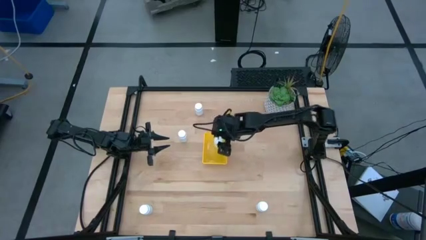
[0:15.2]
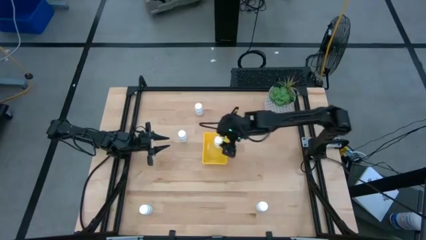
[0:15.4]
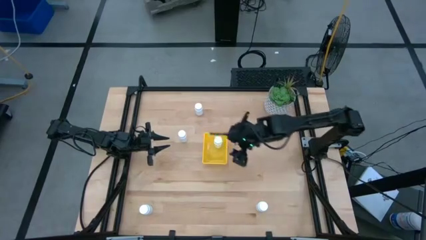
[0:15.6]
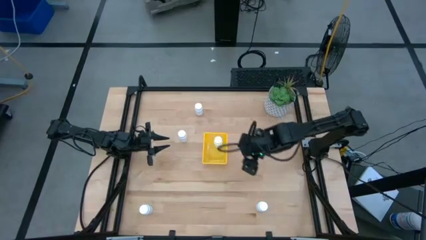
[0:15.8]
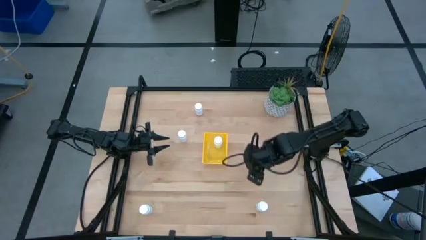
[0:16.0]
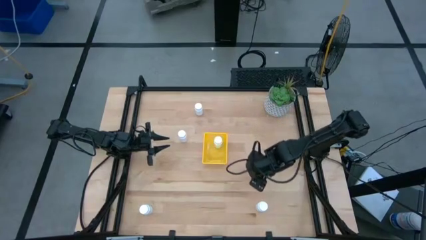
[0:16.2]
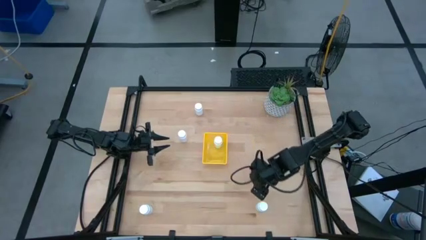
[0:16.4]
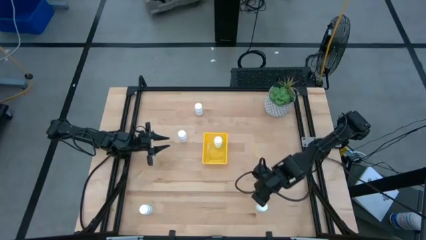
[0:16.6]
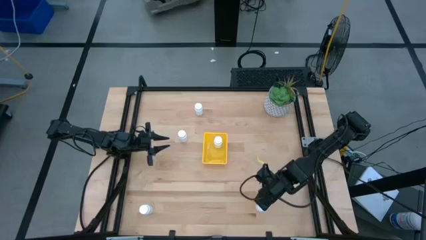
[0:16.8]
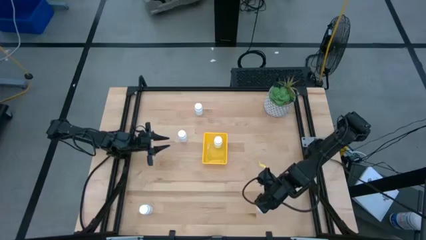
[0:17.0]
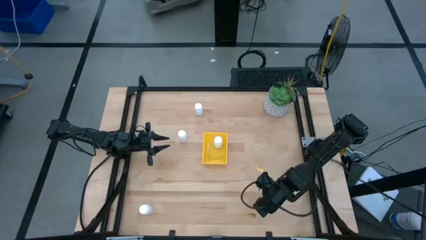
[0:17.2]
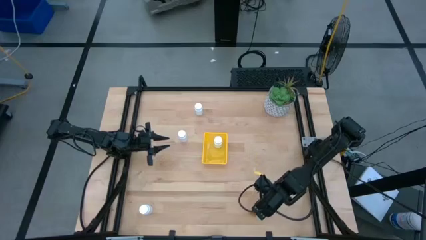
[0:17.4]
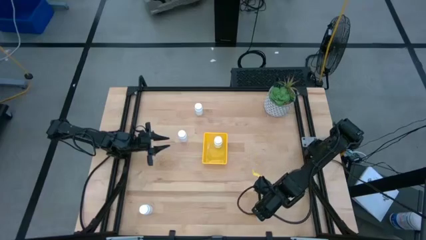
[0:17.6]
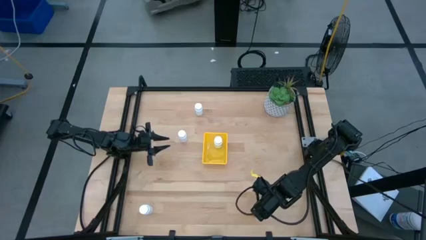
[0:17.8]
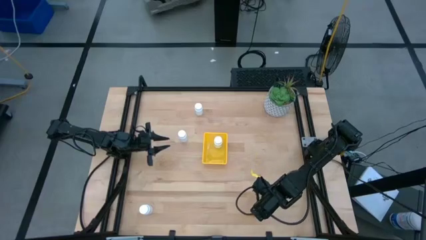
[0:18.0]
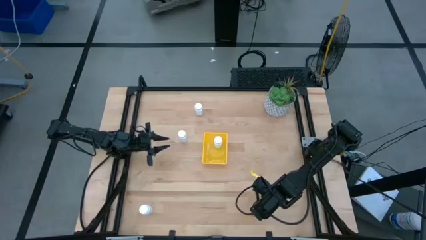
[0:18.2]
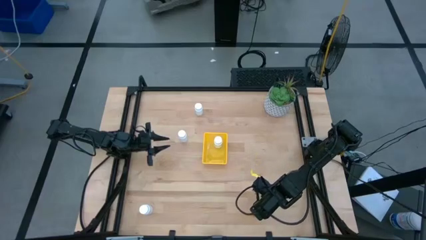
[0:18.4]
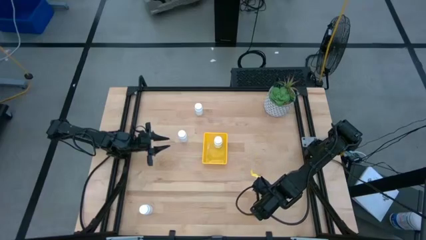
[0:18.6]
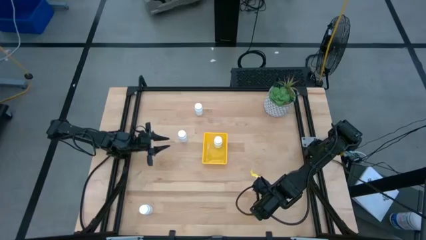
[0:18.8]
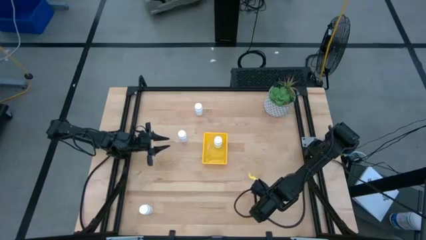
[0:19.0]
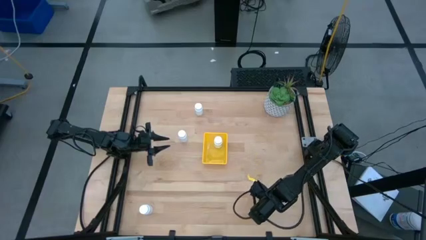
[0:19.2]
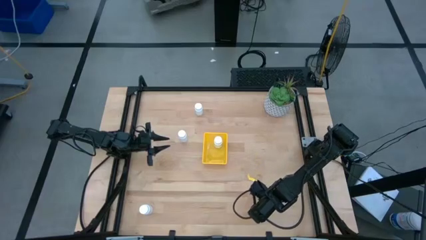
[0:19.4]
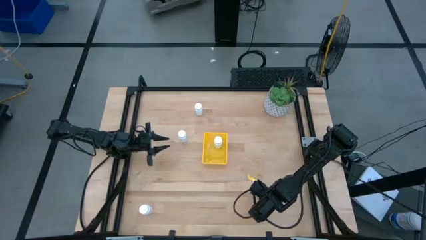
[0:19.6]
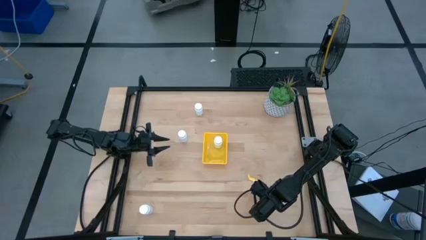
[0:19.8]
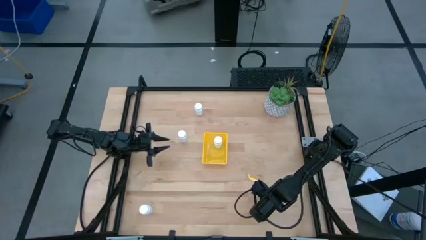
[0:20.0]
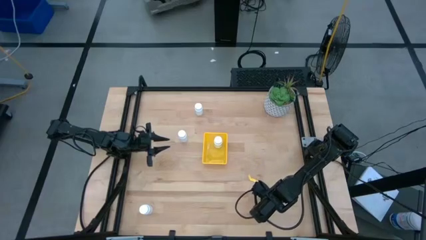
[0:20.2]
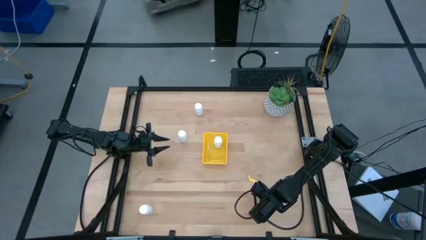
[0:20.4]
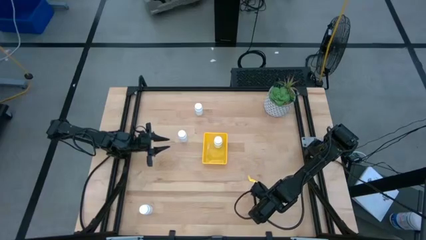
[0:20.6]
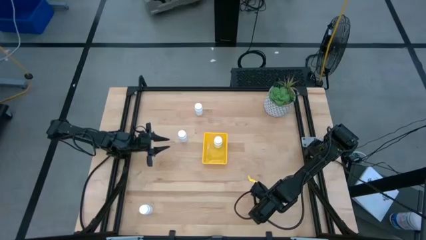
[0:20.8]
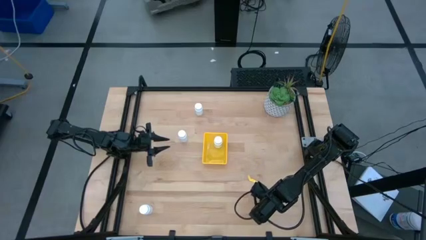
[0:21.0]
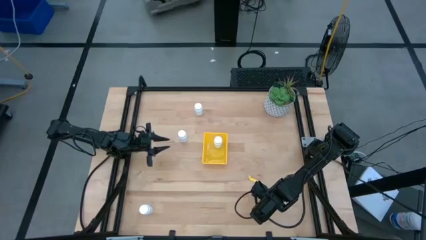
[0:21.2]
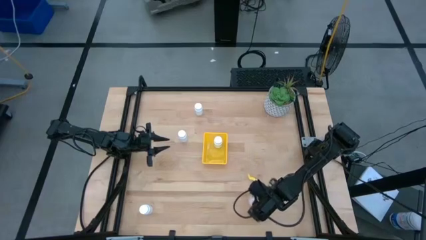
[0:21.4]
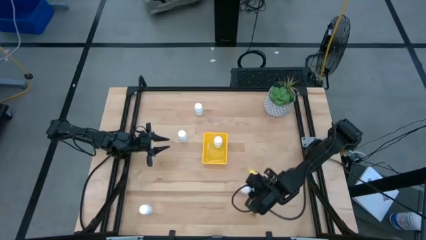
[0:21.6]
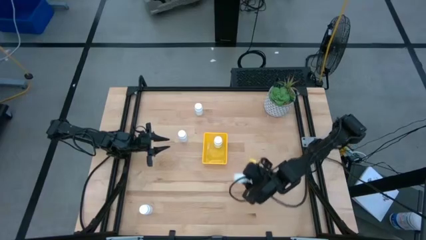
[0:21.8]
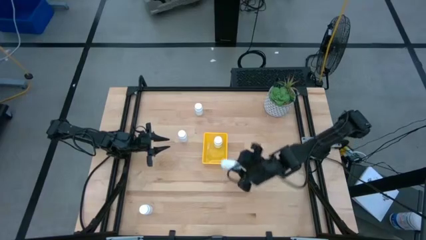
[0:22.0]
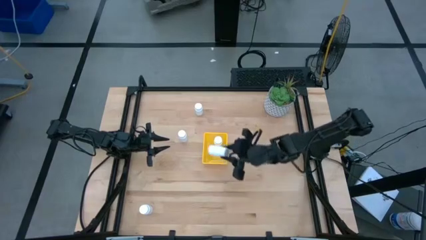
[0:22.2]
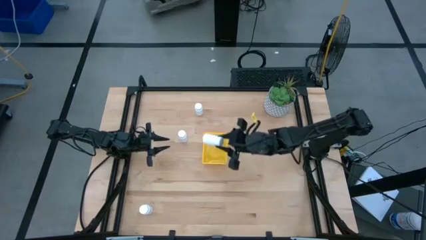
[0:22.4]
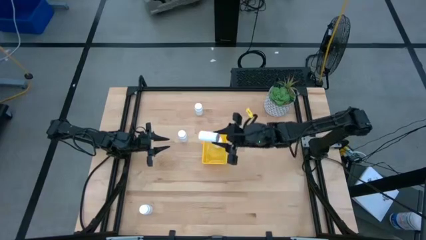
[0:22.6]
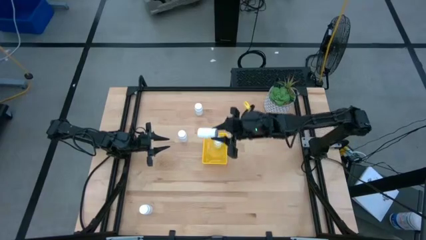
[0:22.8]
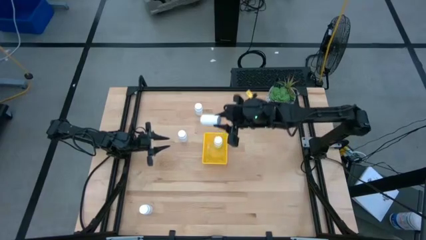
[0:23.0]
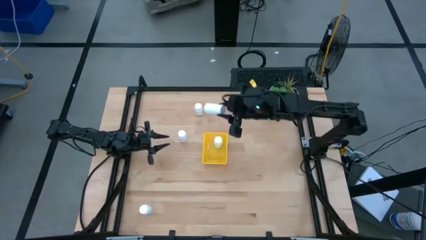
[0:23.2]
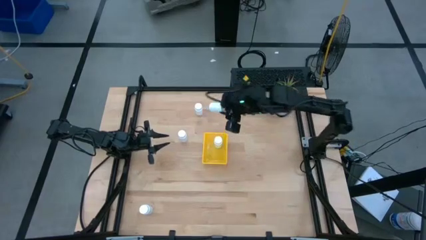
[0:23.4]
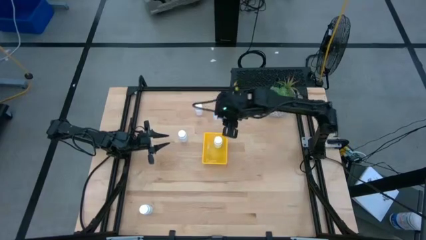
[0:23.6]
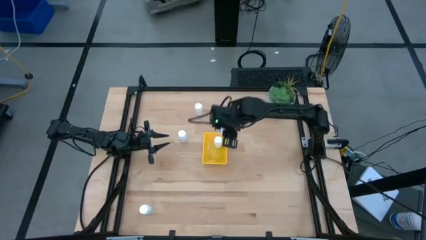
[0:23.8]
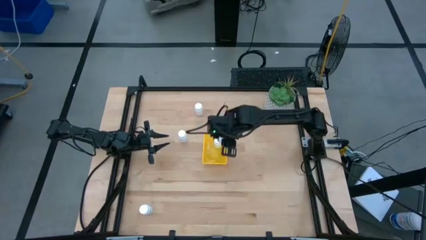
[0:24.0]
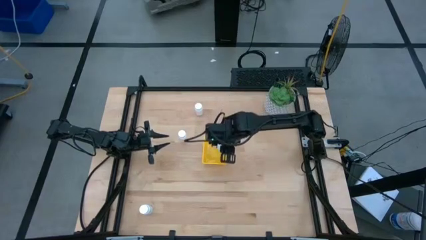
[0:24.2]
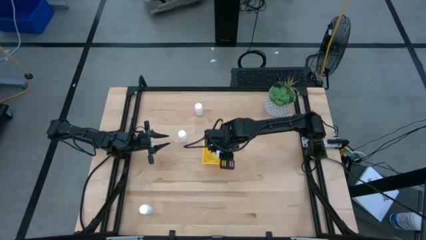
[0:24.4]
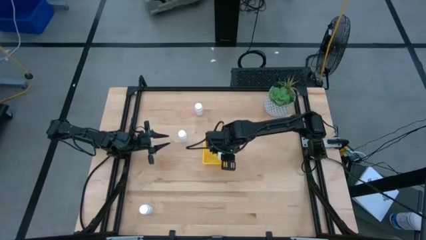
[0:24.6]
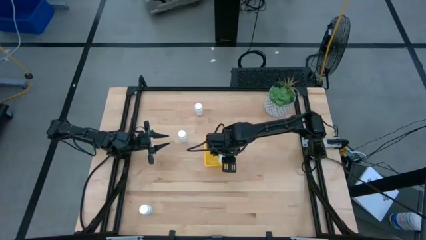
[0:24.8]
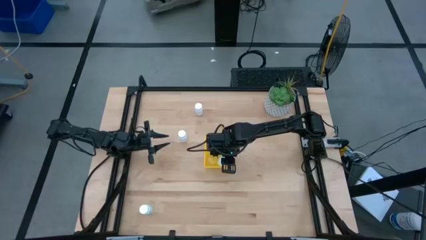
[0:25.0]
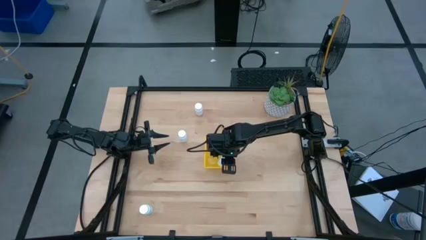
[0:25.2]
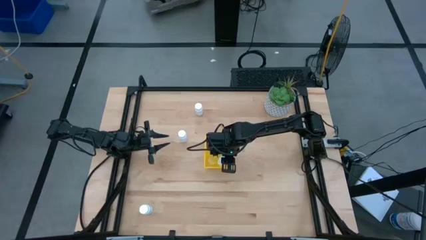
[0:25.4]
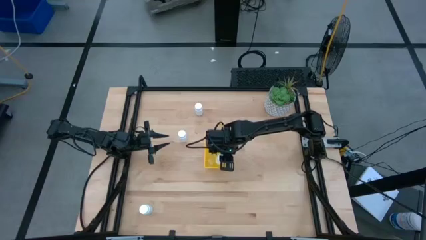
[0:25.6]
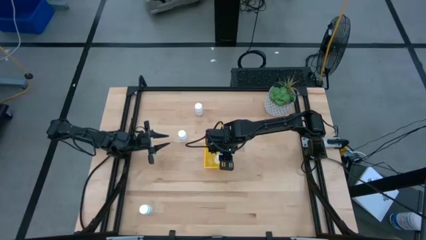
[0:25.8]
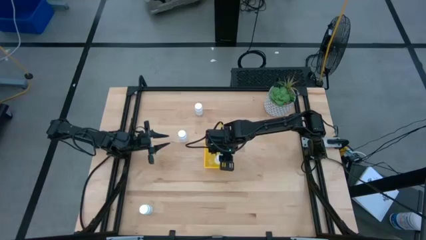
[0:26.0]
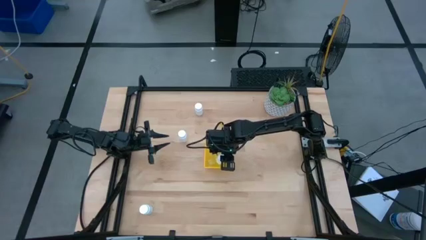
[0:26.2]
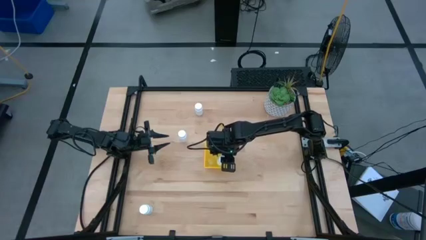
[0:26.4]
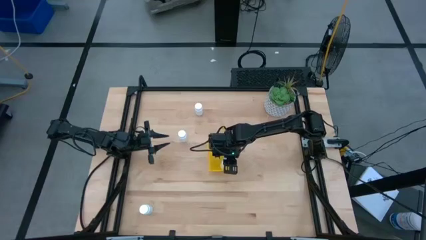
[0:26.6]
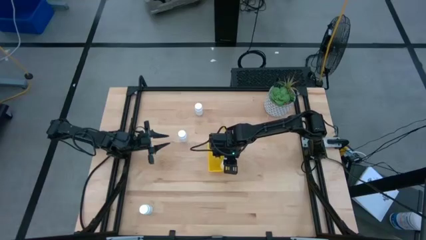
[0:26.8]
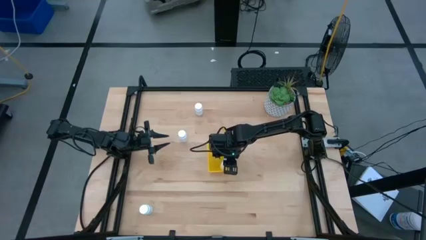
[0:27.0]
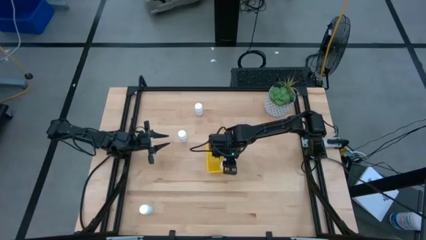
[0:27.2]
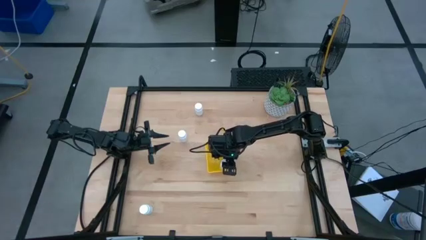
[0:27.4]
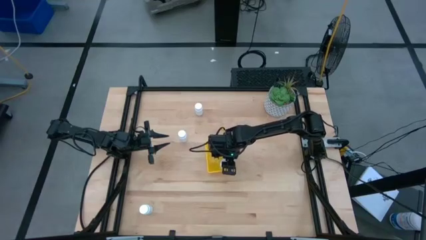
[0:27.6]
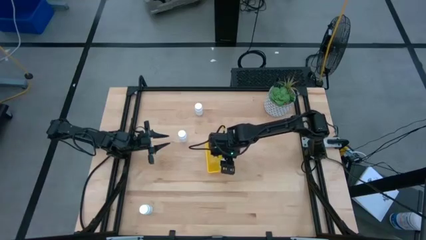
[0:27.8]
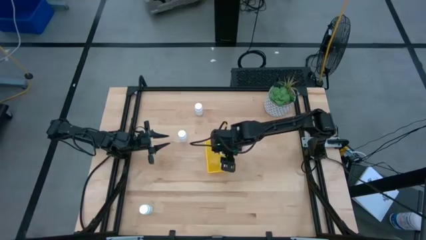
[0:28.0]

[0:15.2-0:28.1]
Task: Pick and place pill bottles into a basket
Put the white pill bottle into the yellow bin

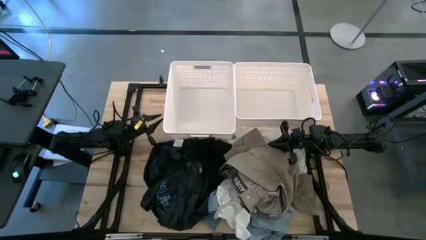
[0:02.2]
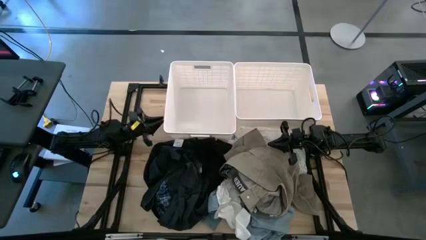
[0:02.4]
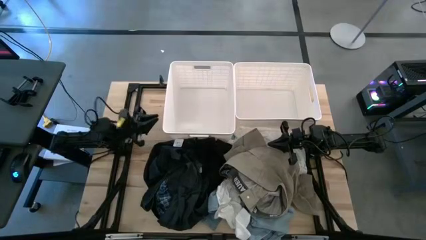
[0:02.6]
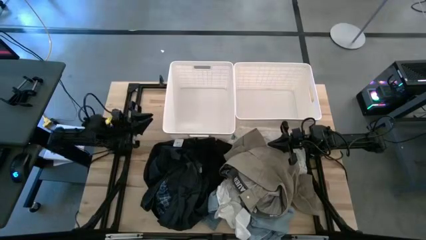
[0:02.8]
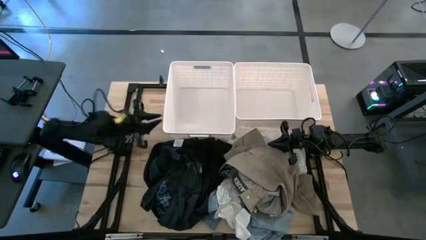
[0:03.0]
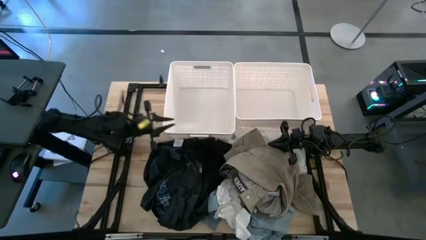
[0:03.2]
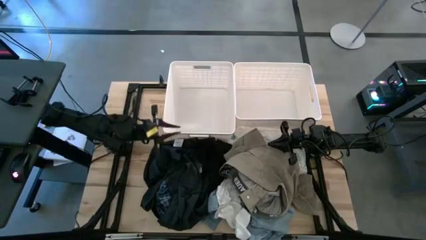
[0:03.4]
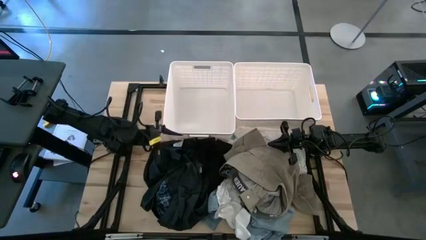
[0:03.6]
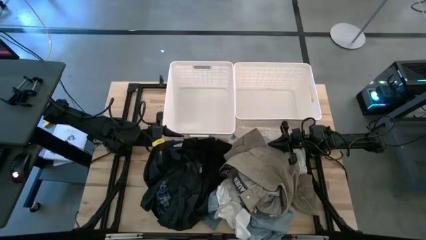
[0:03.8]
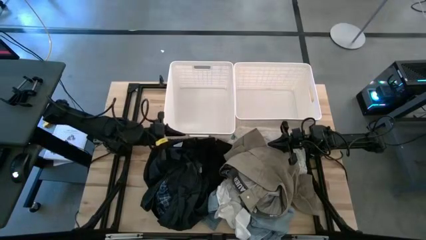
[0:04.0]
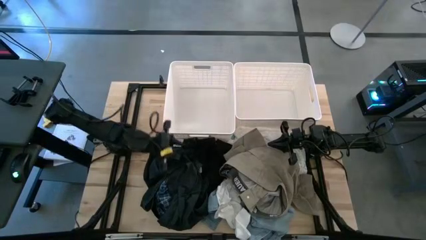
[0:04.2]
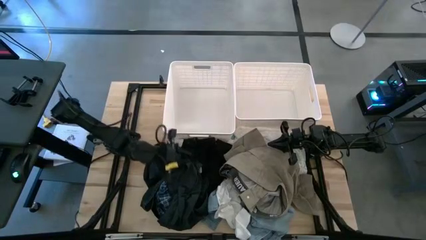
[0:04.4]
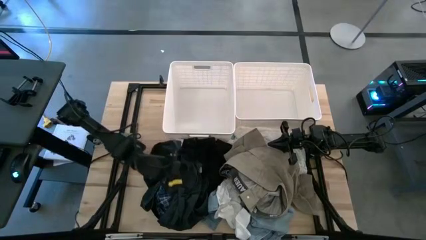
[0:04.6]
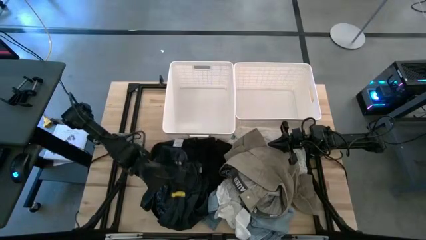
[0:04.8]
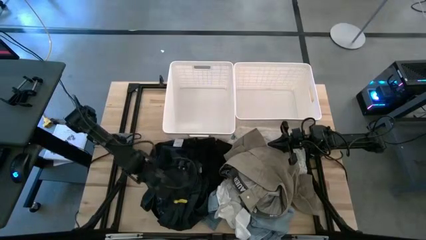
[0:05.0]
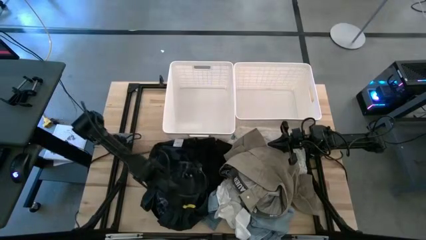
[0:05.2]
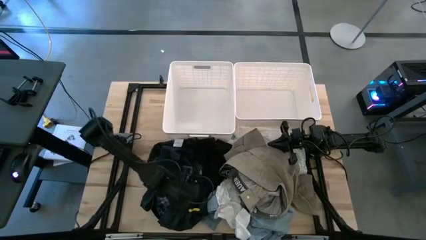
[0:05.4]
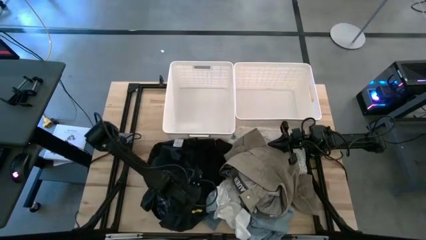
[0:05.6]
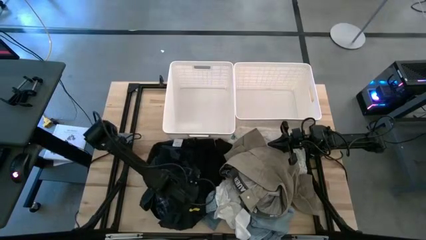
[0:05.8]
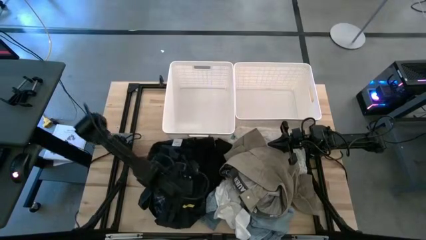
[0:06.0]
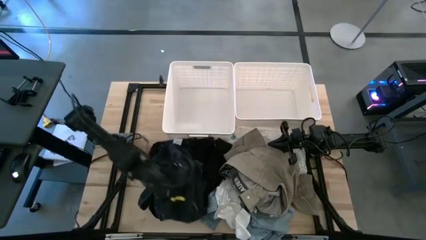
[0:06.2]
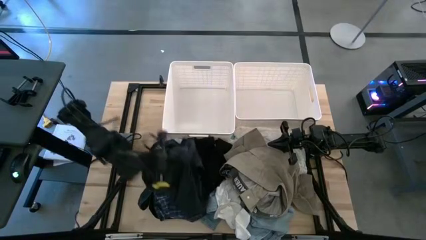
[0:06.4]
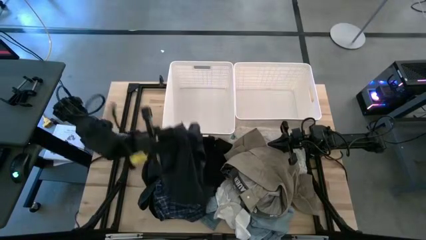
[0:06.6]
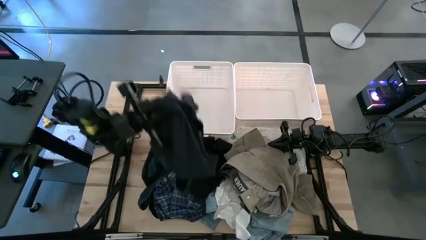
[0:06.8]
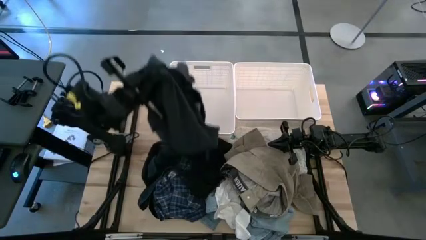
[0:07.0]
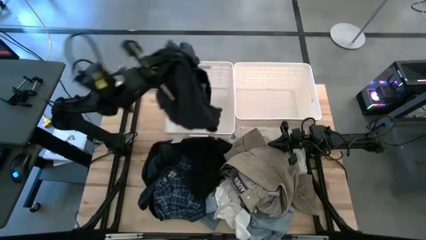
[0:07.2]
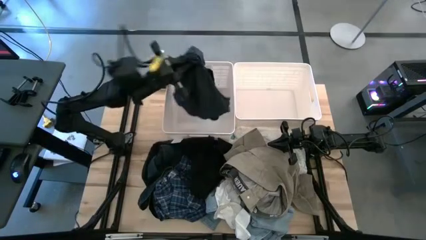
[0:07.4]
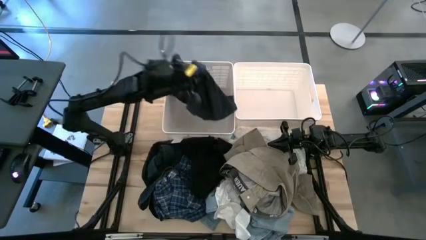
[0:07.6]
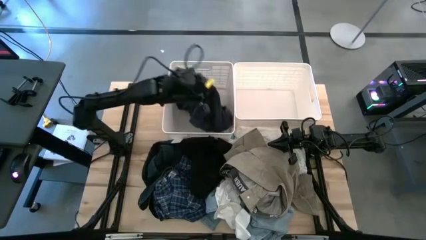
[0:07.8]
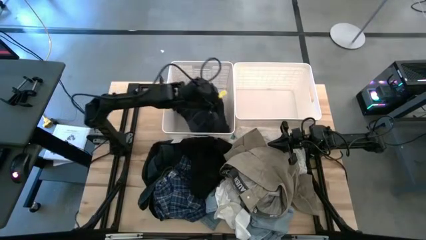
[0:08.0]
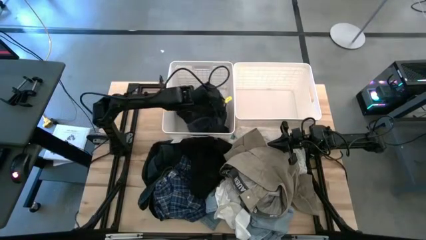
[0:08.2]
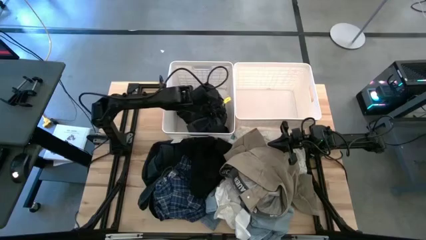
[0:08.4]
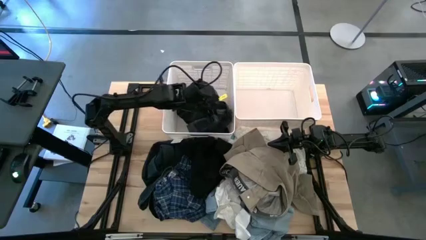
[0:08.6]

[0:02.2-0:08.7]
Task: Sort clothes
Put the black shorts into the left white bin
